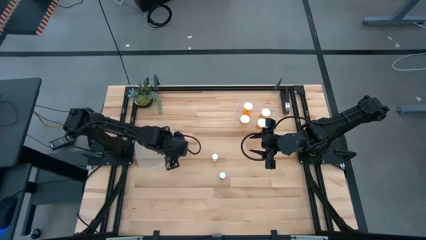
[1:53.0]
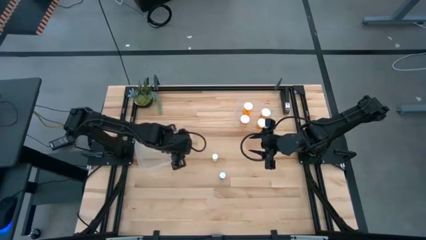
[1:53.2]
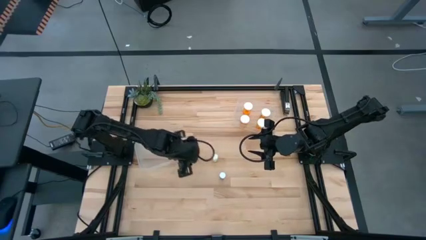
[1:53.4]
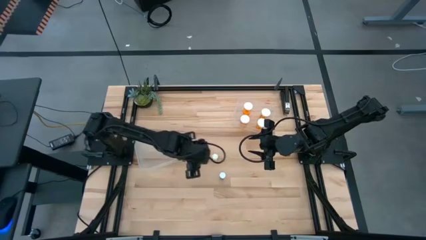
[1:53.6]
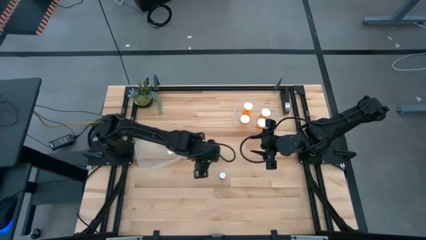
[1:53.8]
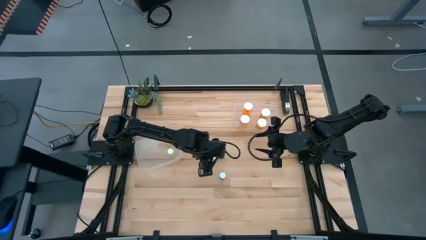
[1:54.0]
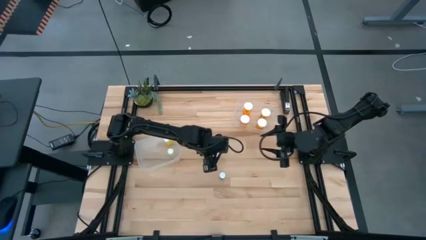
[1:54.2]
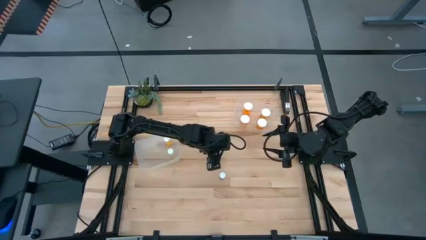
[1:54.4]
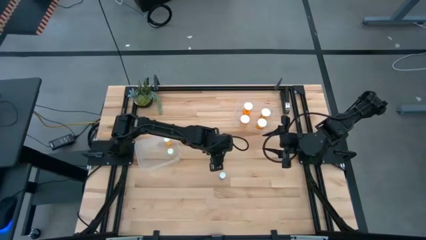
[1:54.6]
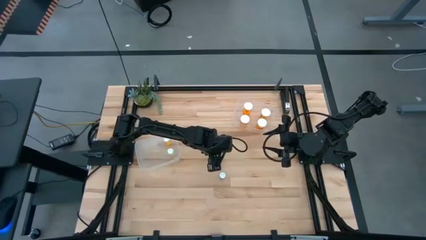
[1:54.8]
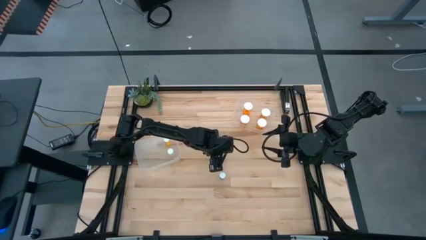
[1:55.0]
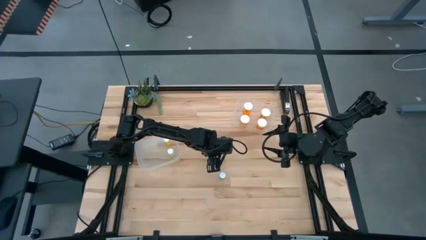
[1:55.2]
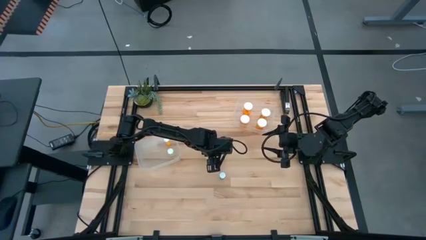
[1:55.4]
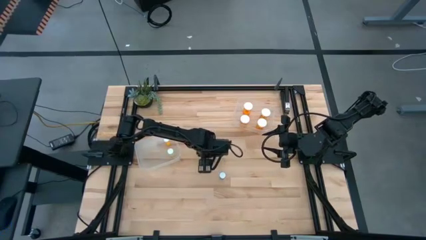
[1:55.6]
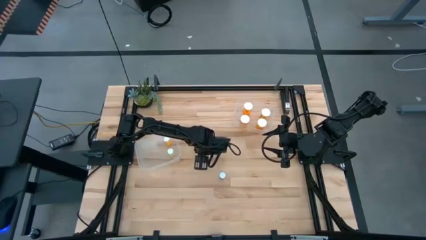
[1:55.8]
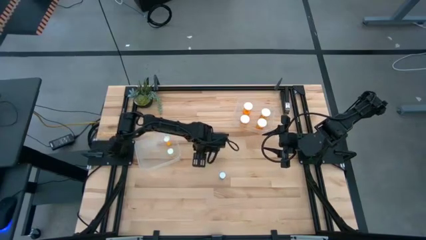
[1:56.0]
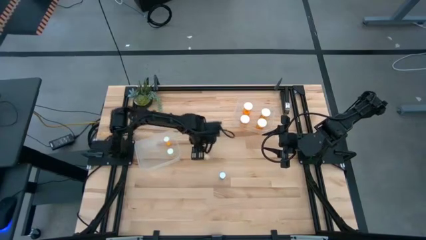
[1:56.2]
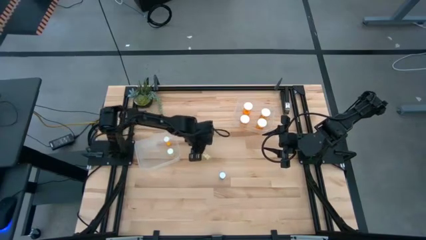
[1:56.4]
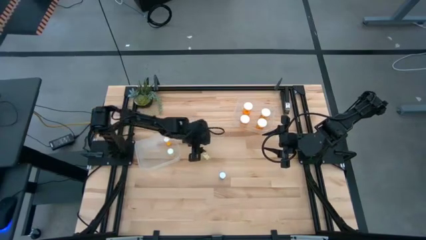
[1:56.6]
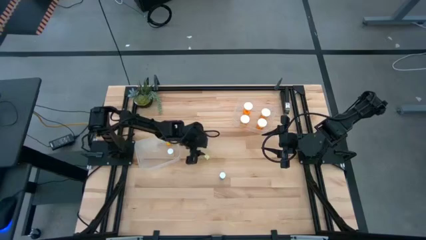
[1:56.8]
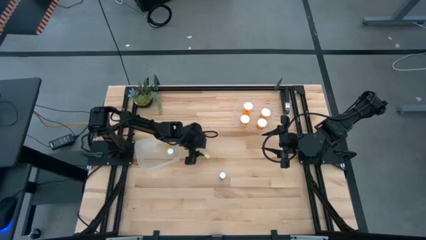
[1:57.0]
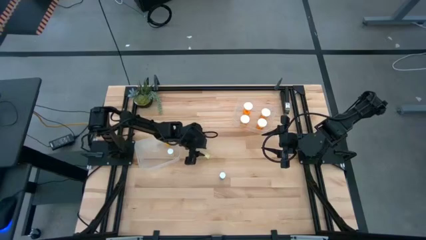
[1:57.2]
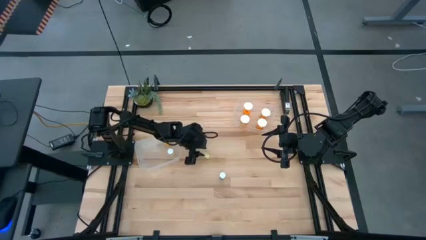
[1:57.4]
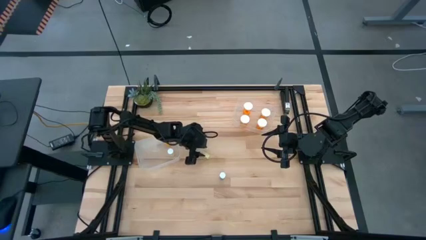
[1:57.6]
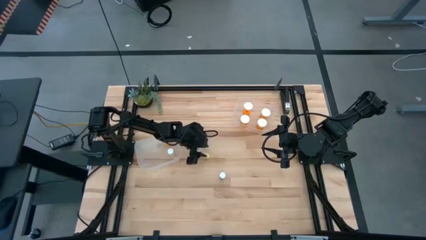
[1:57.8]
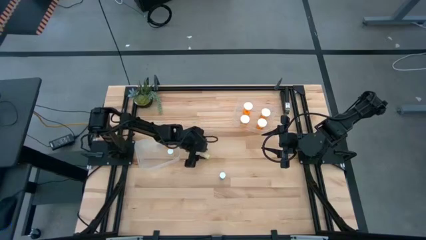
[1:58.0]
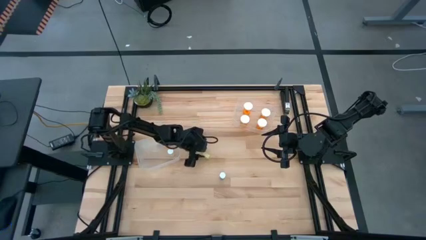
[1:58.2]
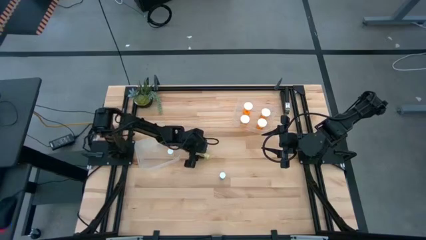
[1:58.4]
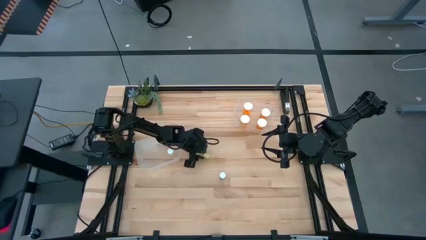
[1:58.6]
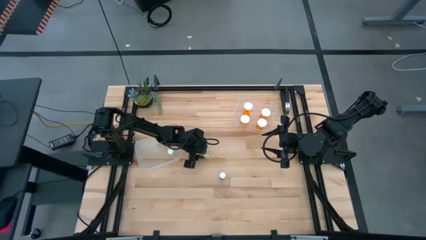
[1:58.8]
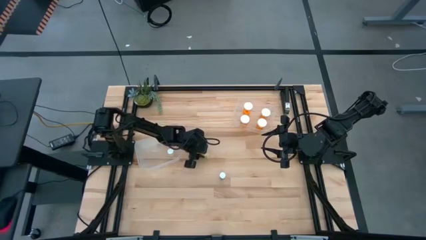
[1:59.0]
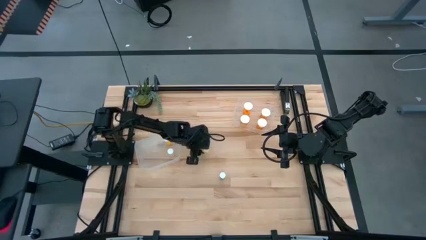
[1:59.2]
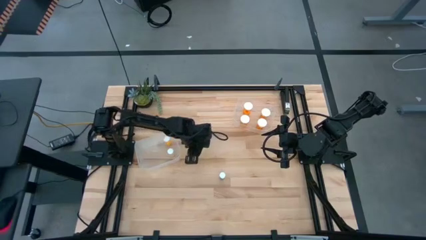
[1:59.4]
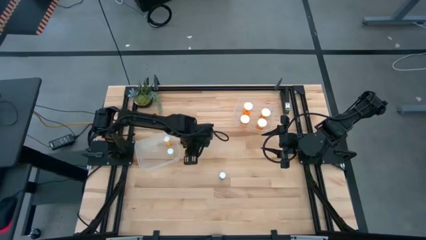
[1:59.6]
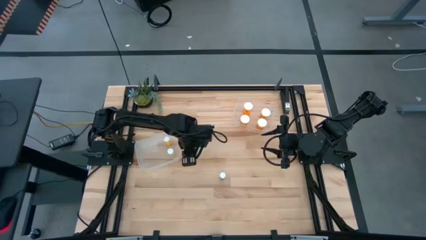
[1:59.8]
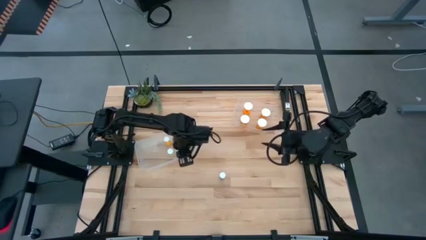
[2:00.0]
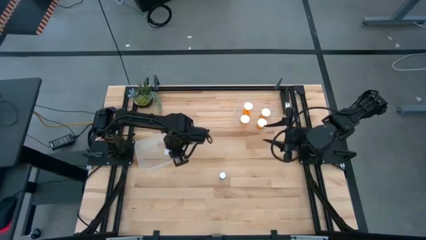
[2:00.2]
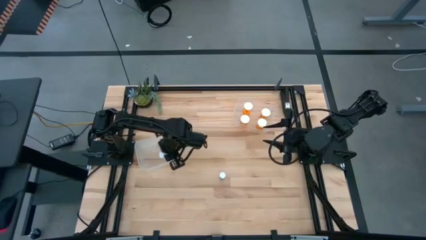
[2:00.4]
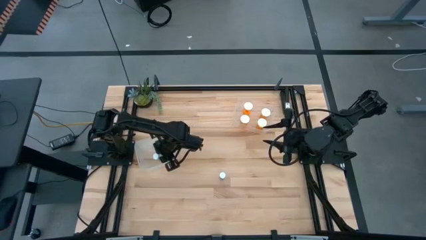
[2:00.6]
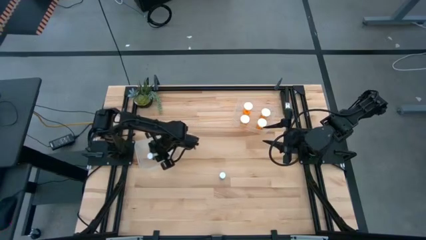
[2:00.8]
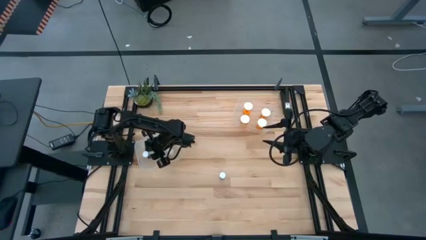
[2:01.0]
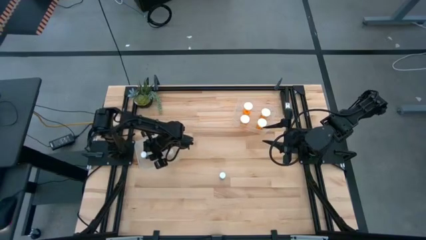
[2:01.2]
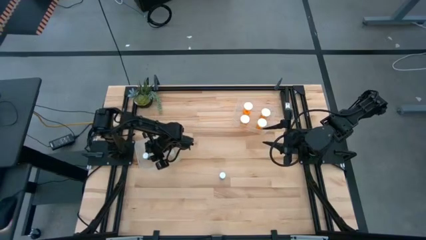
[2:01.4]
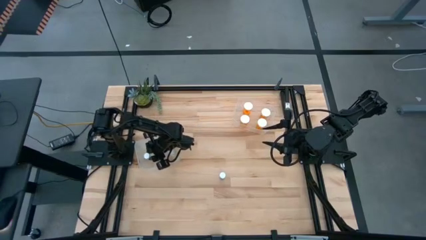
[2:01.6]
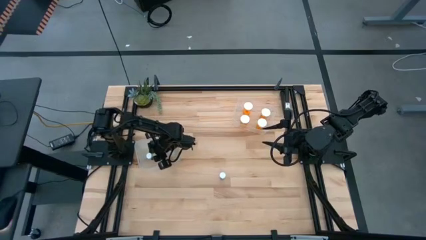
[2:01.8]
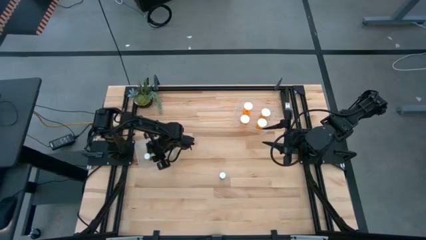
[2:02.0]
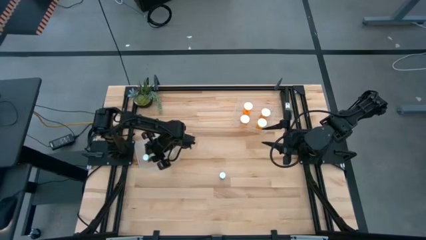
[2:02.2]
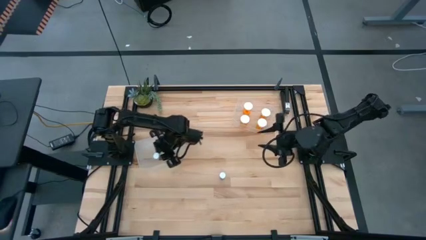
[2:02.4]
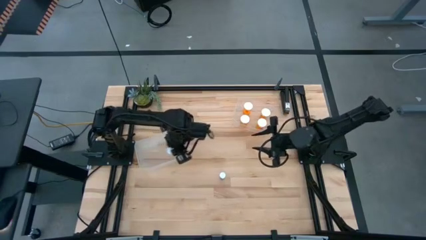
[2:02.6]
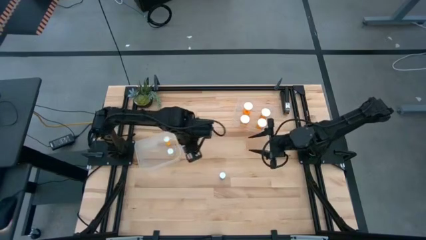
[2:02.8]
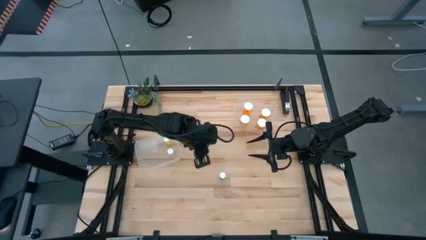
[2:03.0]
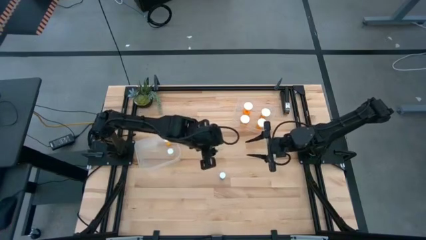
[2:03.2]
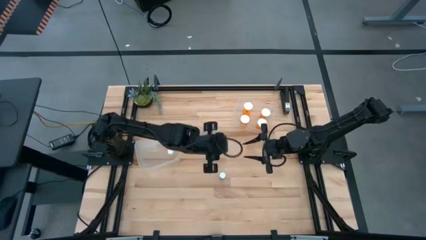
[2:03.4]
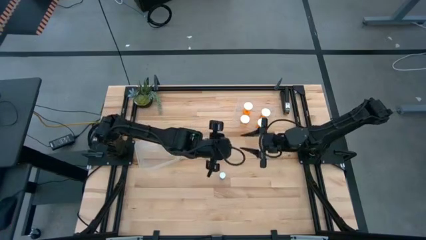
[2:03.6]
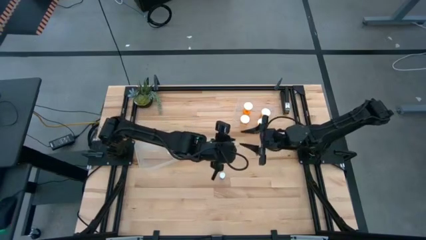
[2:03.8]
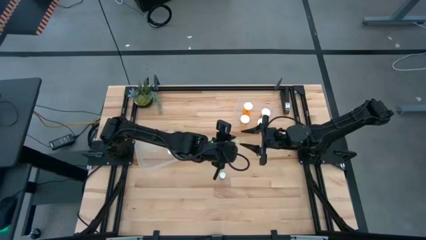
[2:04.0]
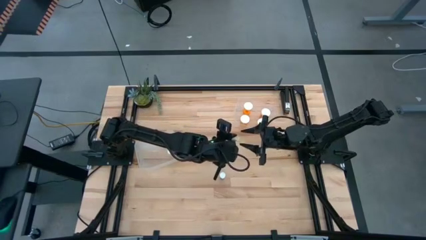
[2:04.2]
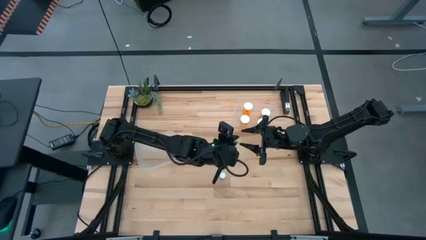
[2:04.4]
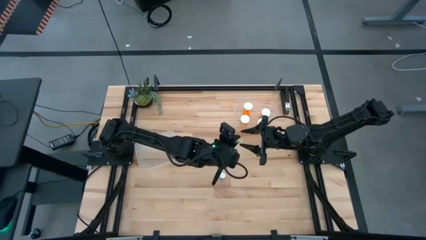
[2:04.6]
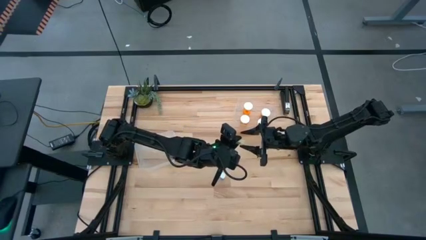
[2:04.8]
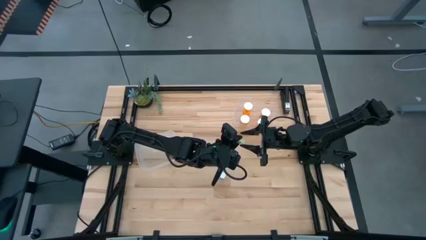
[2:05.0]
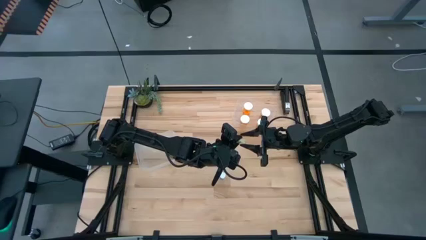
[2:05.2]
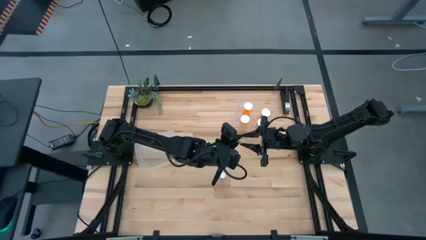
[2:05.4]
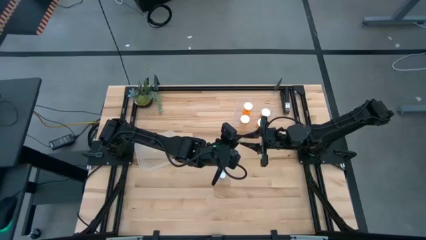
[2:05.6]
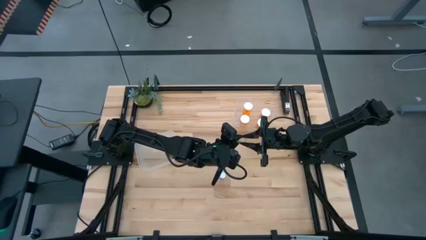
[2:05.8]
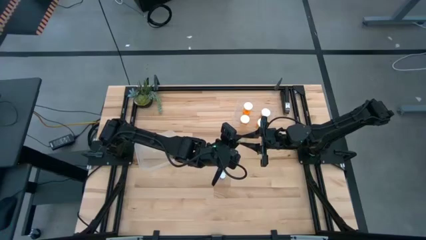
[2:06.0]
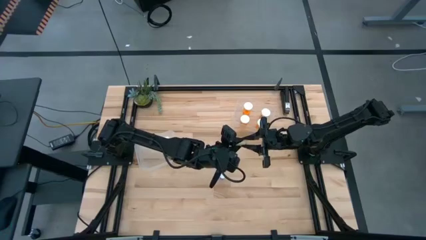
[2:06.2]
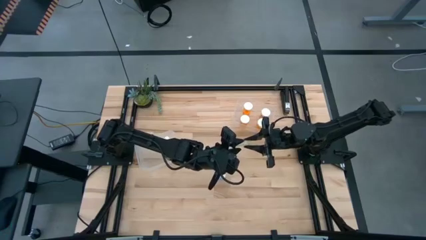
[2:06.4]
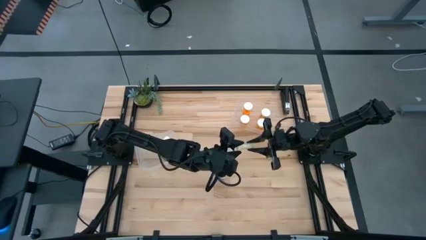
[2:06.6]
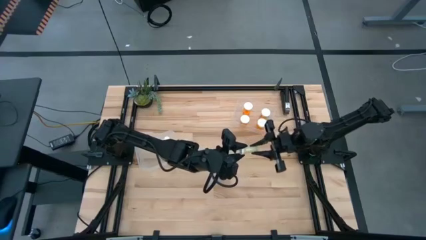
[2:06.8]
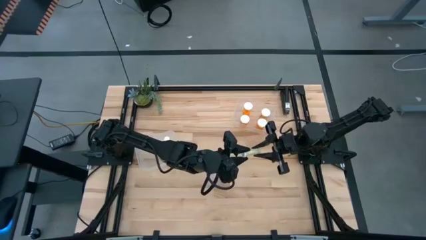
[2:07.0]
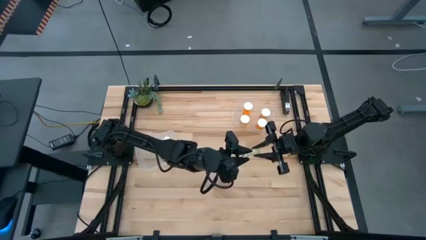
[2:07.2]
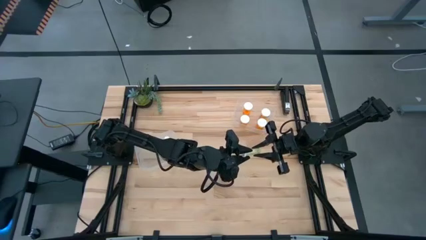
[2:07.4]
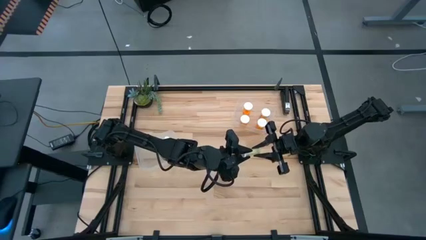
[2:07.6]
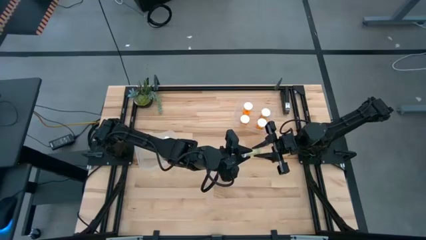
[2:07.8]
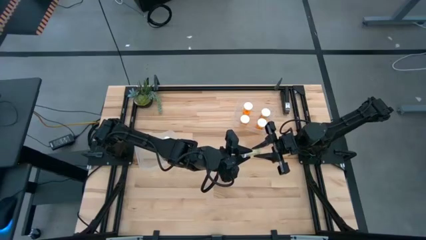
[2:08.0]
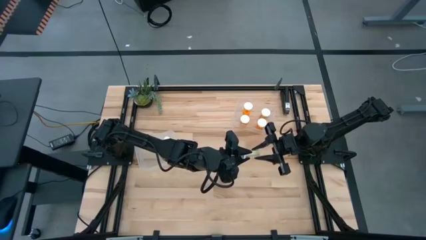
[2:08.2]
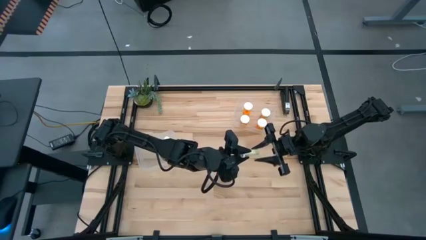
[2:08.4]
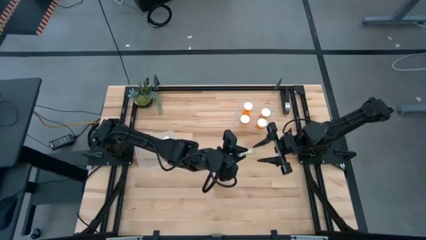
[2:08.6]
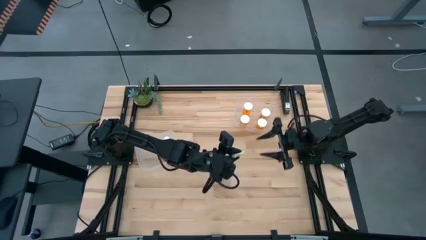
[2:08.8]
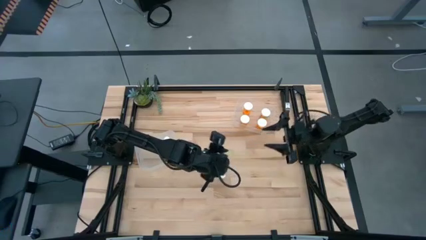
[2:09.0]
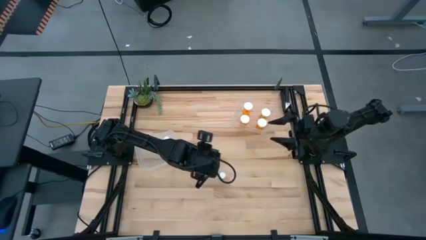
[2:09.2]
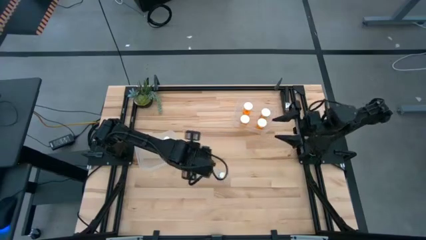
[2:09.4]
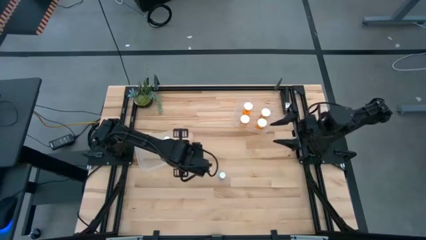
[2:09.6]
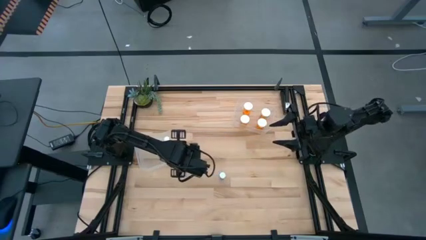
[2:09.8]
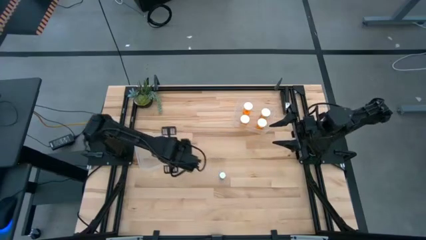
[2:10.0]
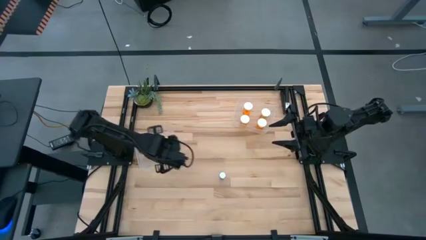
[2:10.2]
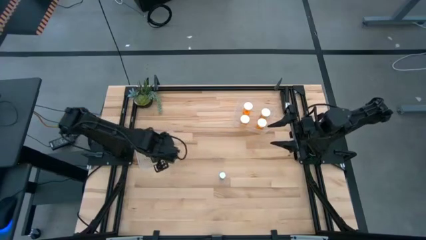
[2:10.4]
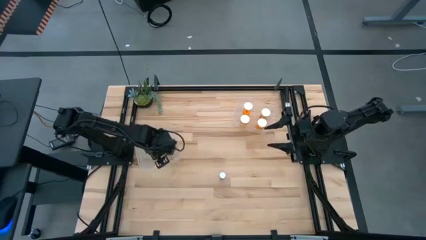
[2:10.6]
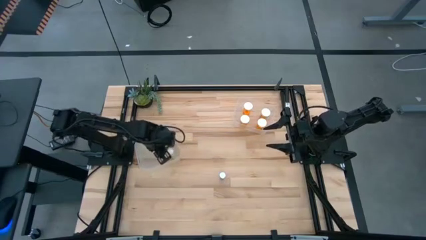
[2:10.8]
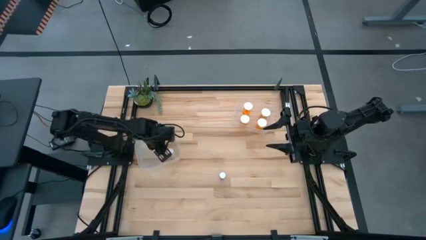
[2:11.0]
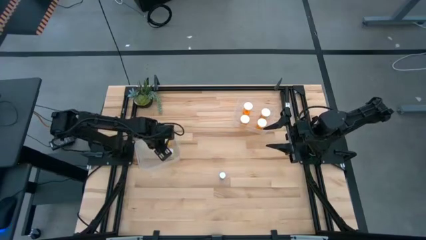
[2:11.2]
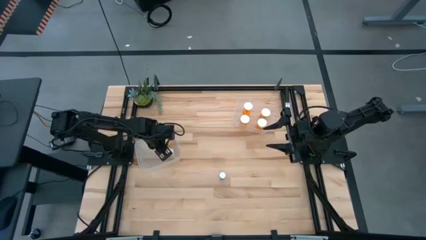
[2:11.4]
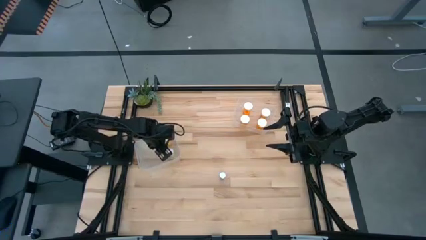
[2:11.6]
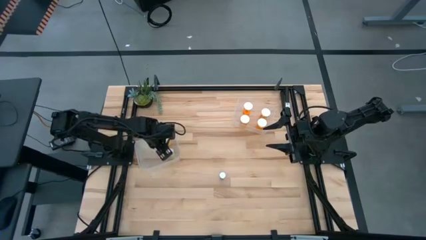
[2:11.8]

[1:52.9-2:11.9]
Task: Pick and place medicine bottles into bin by pill shape (circle, oval)
Put the small yellow pill bottle into the left transparent bin
